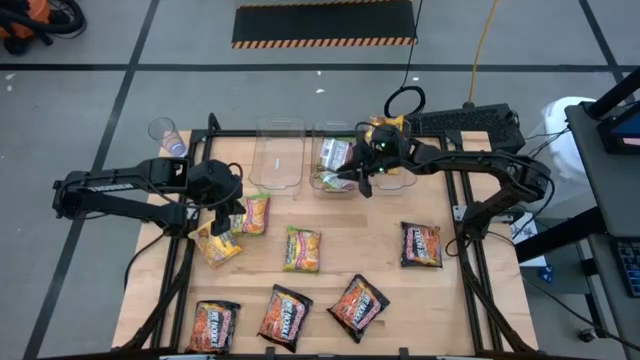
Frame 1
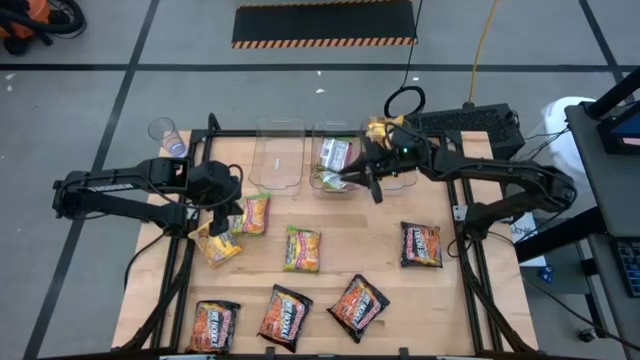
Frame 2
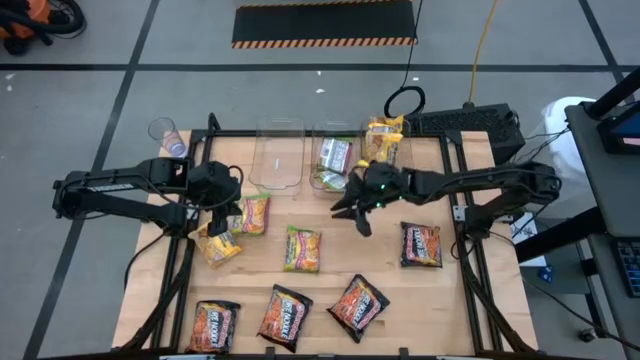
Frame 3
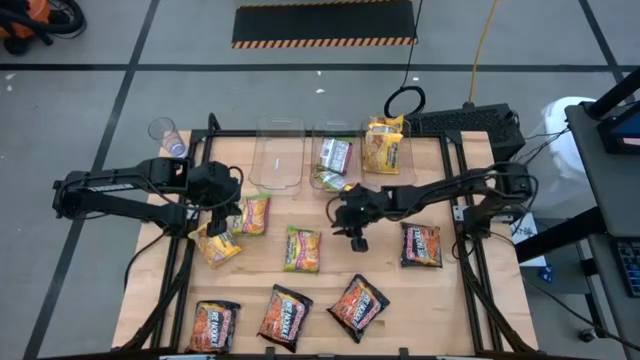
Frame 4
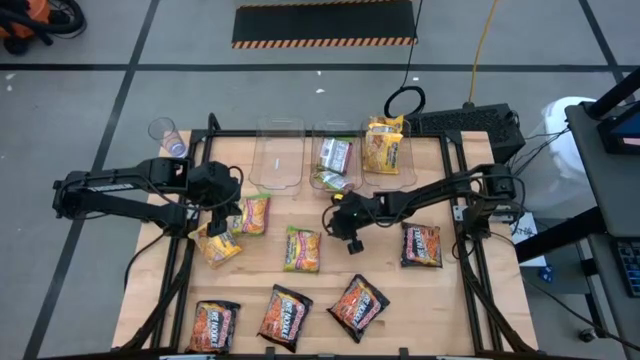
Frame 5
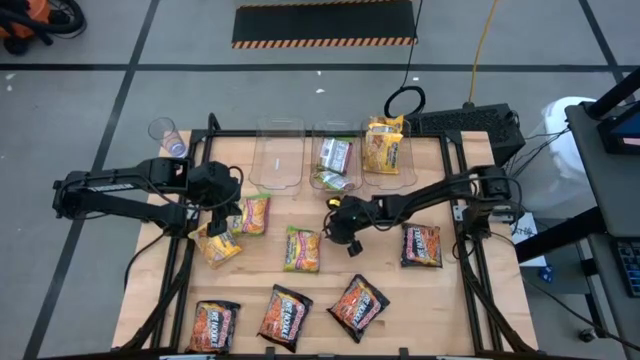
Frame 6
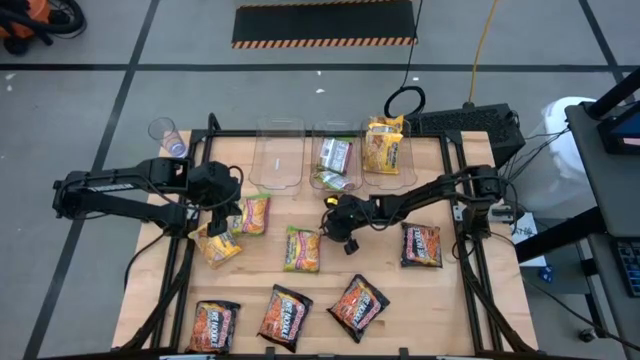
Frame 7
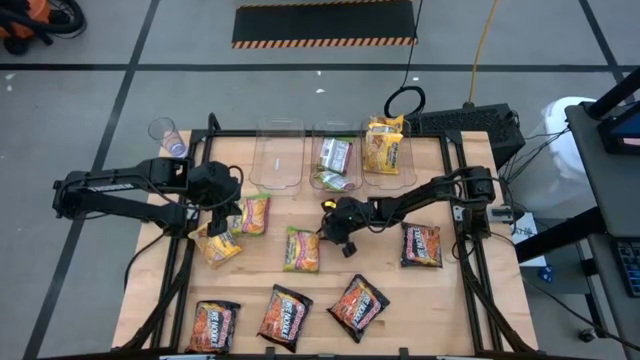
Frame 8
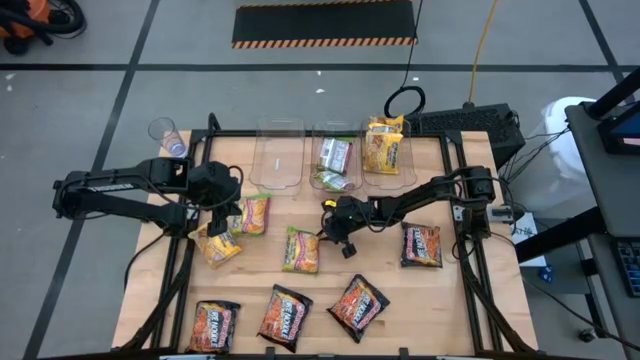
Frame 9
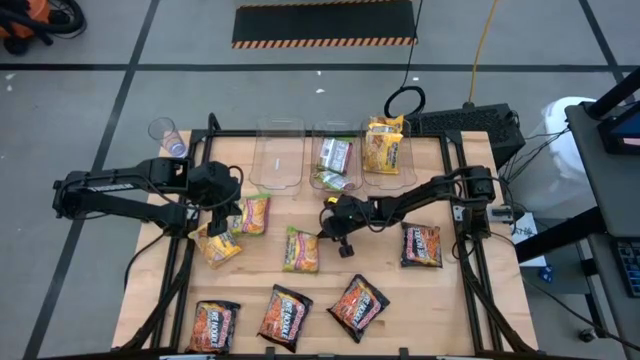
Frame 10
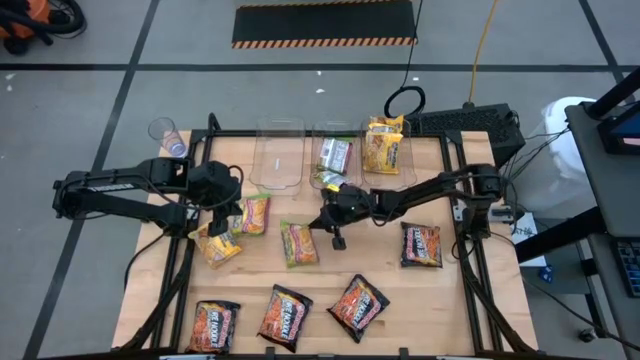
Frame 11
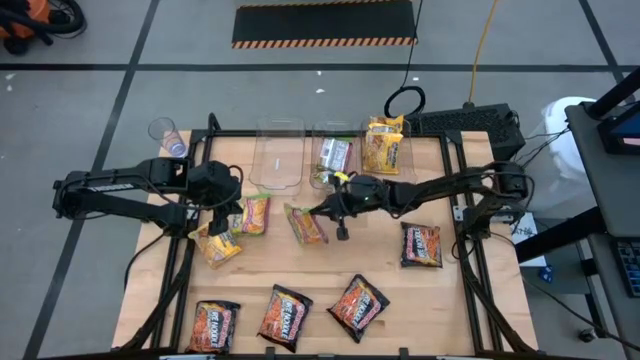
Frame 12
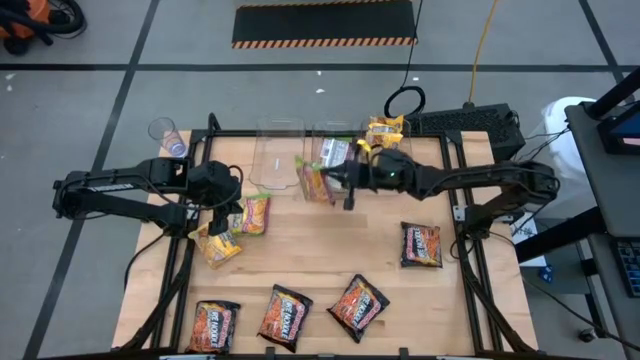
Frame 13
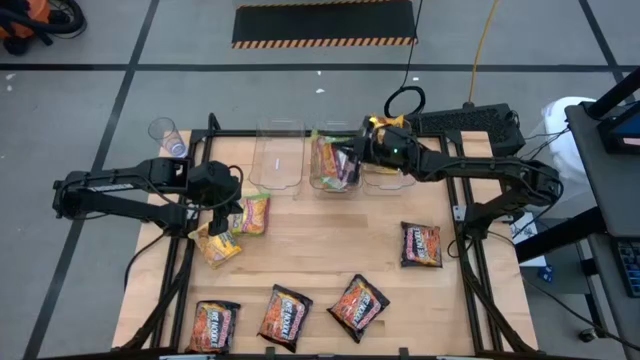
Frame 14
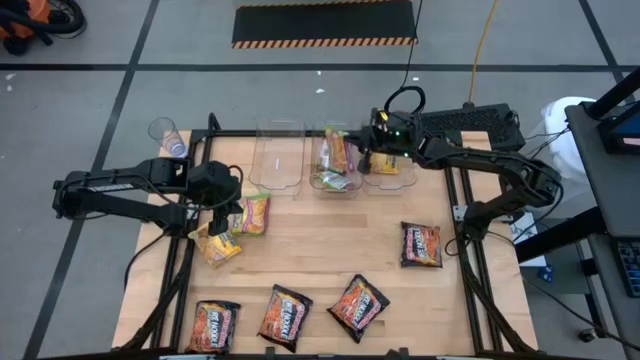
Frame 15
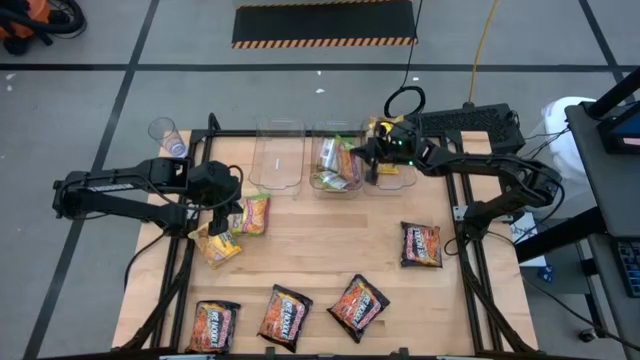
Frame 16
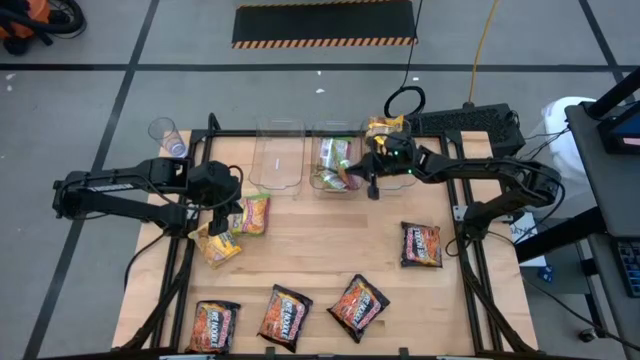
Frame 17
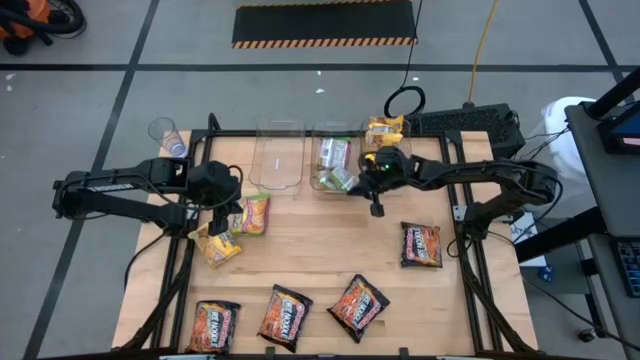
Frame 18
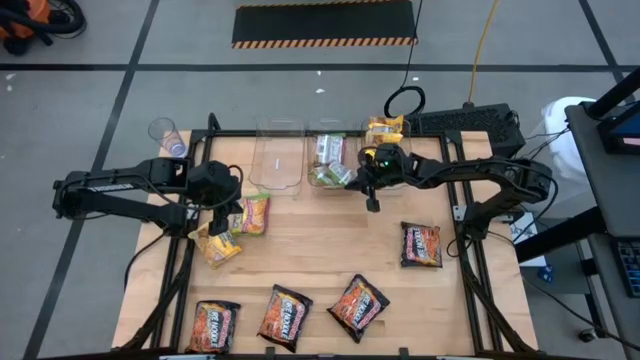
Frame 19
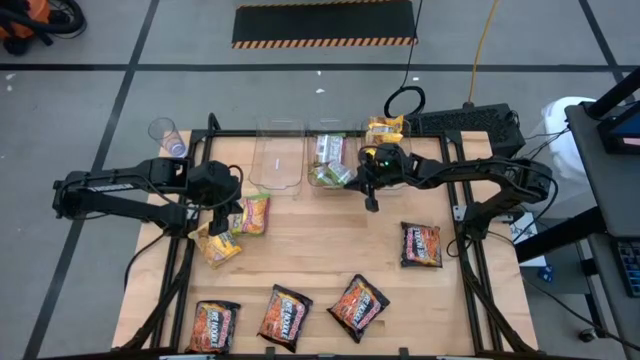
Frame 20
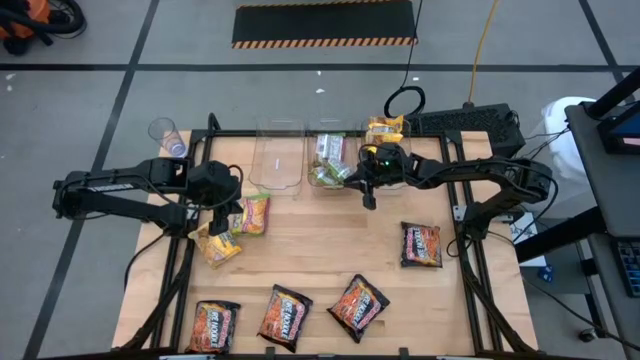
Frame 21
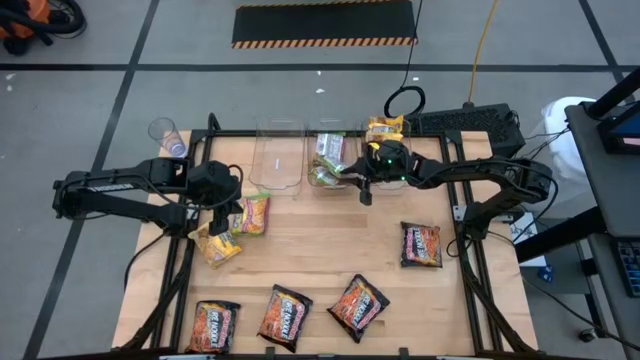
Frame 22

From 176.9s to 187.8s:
Task: Sort Maruchan noodles
Put the green noodle pack into the center transparent bin

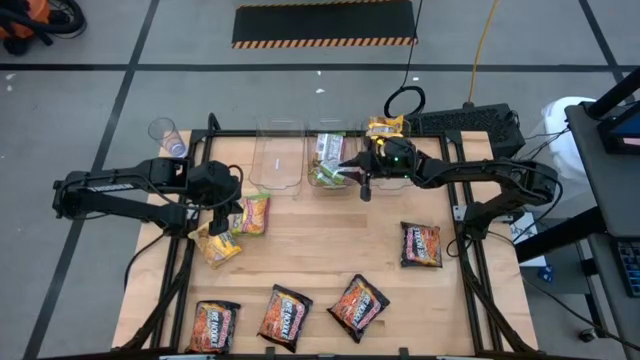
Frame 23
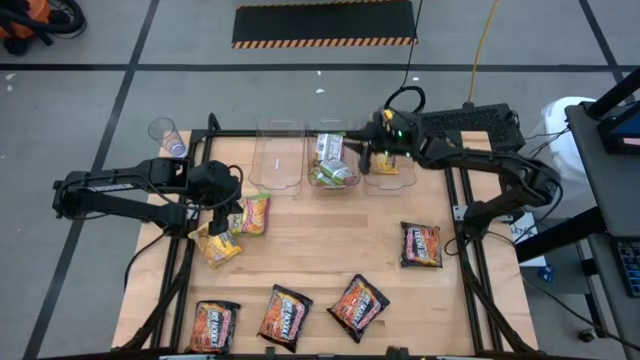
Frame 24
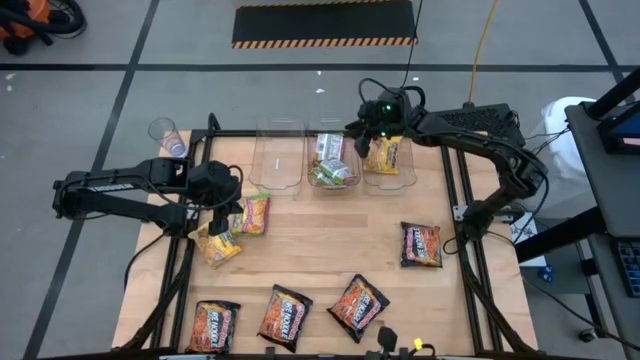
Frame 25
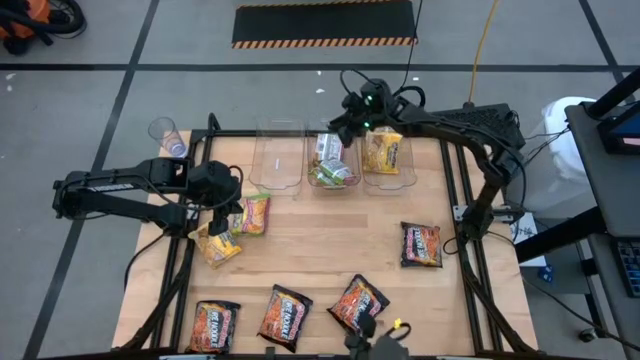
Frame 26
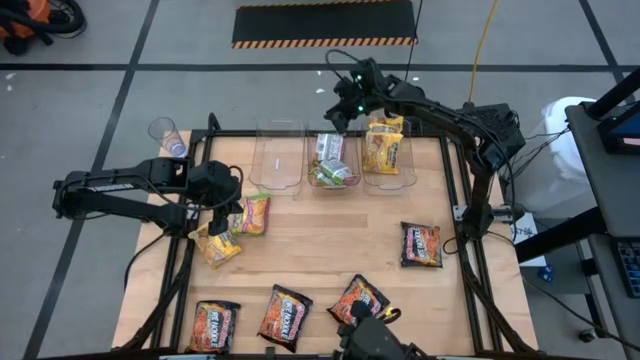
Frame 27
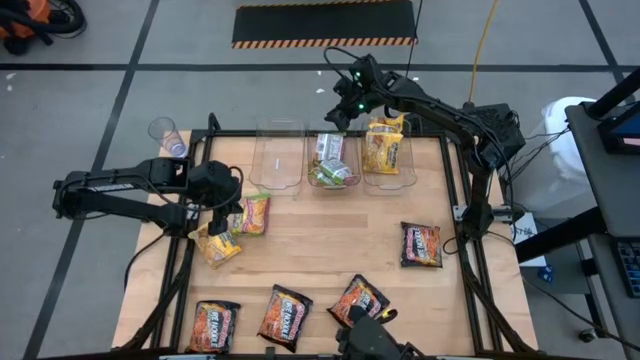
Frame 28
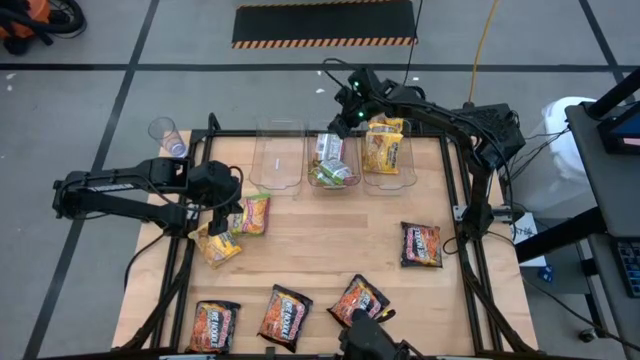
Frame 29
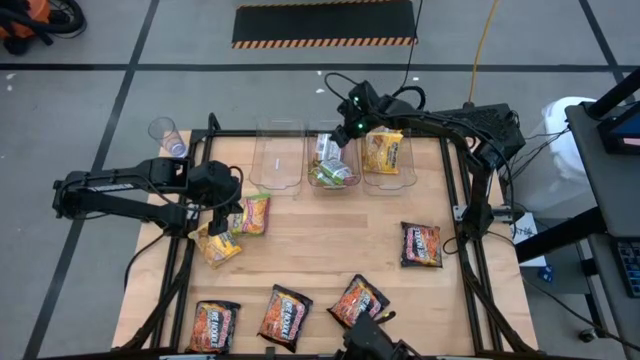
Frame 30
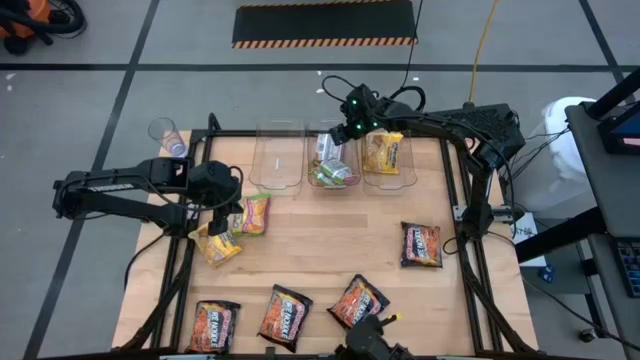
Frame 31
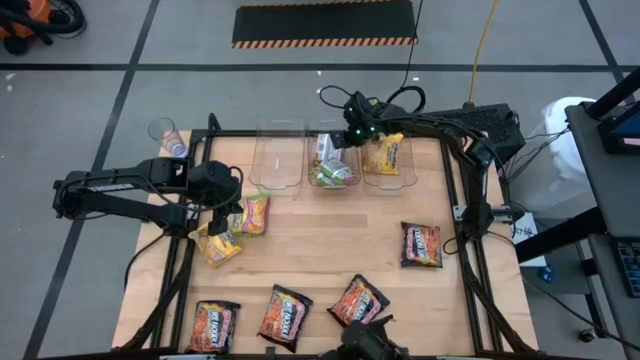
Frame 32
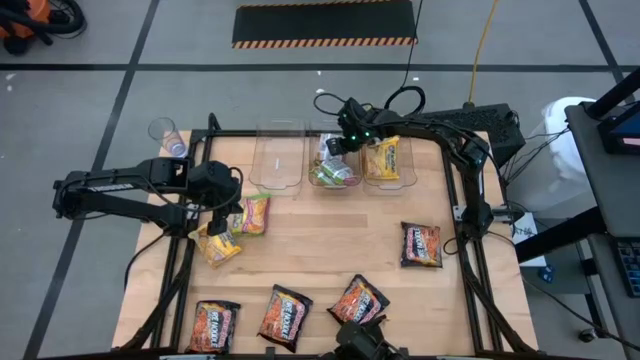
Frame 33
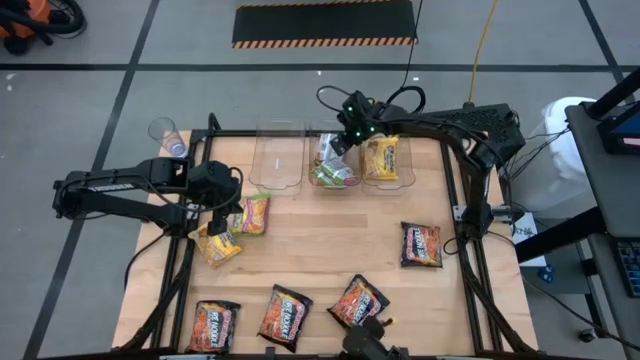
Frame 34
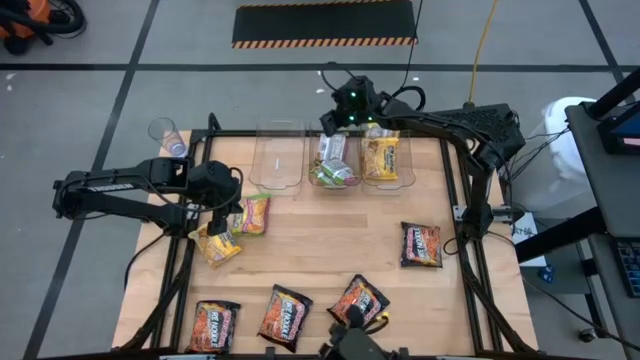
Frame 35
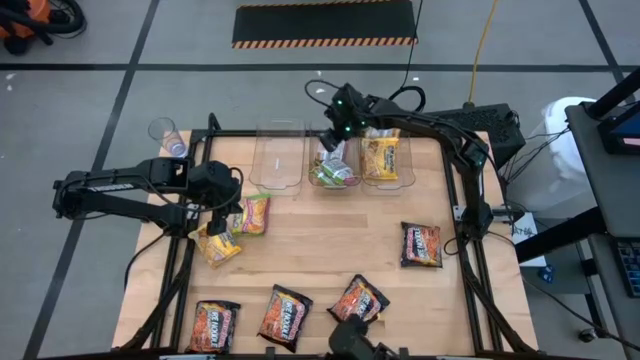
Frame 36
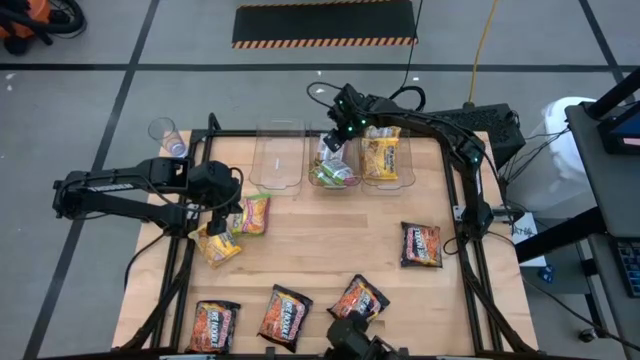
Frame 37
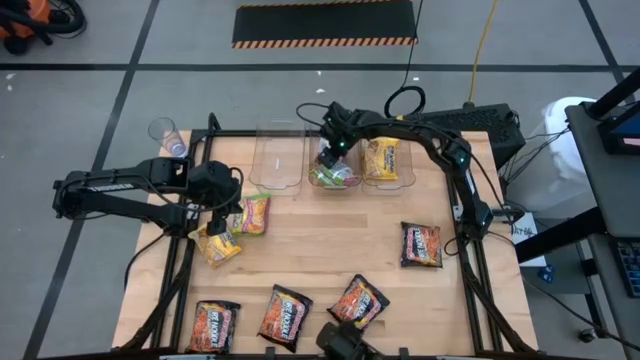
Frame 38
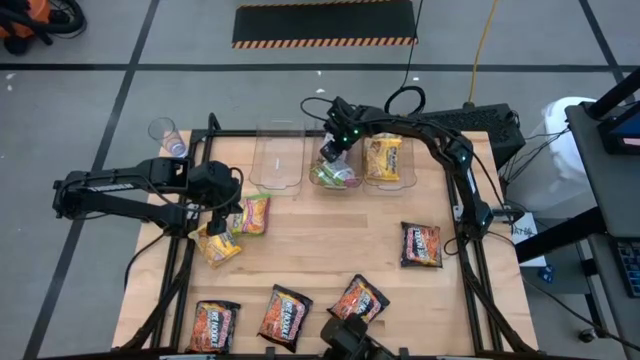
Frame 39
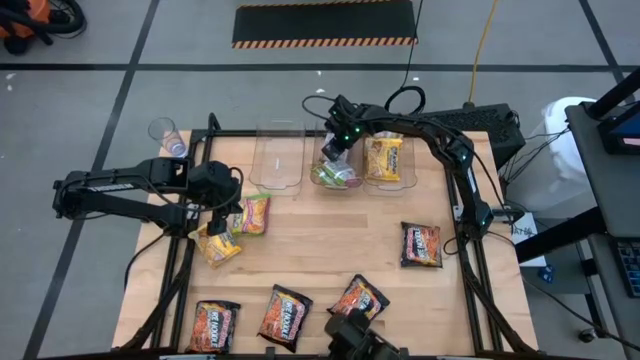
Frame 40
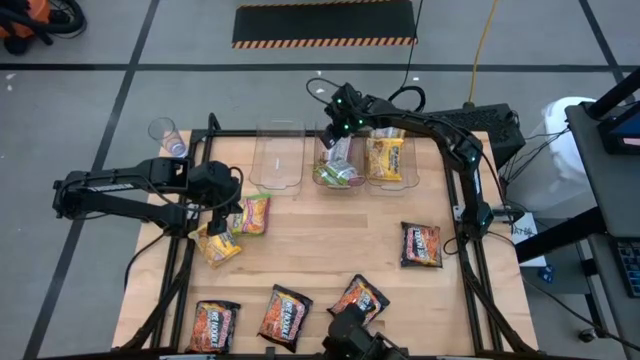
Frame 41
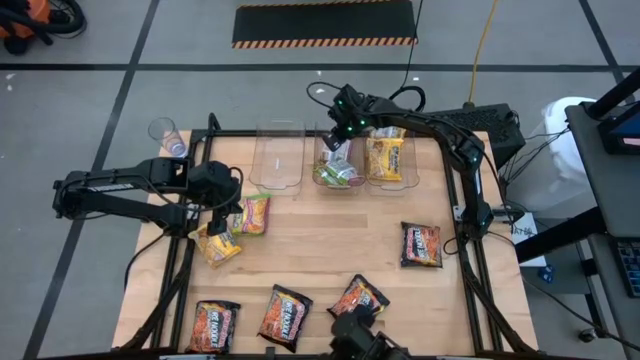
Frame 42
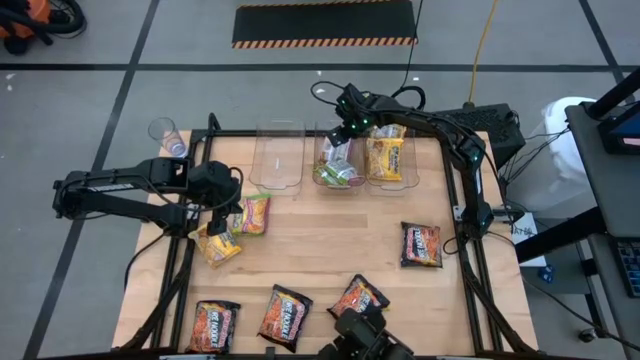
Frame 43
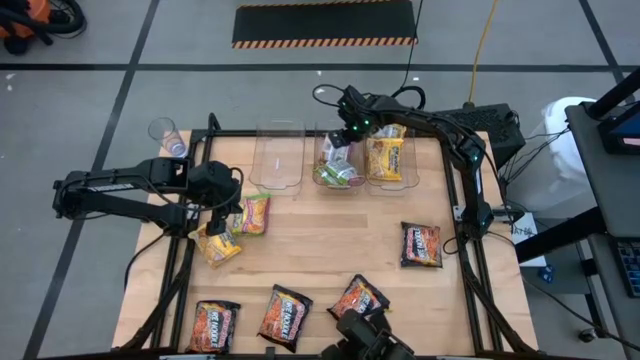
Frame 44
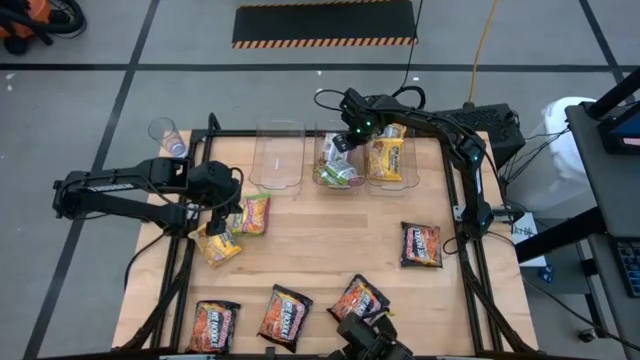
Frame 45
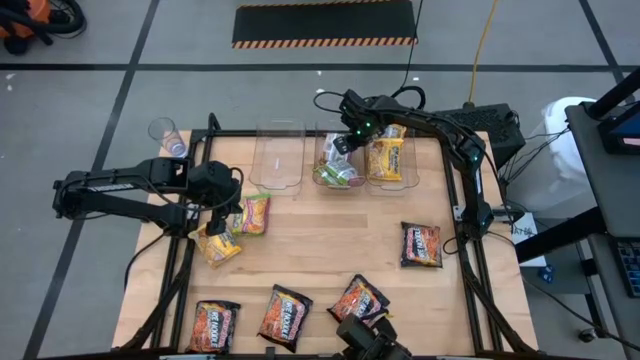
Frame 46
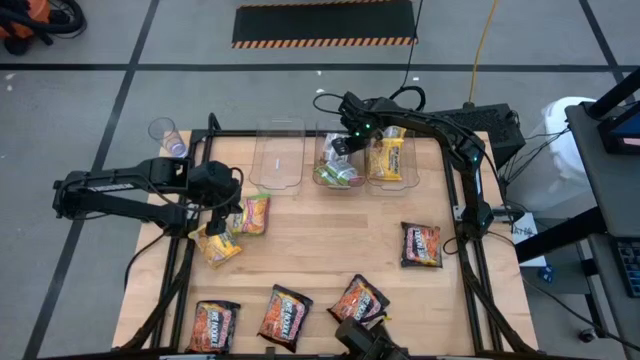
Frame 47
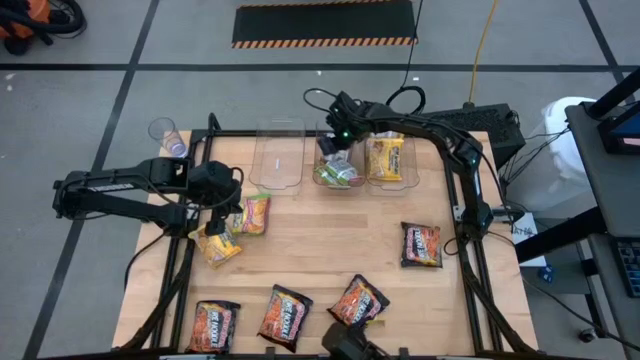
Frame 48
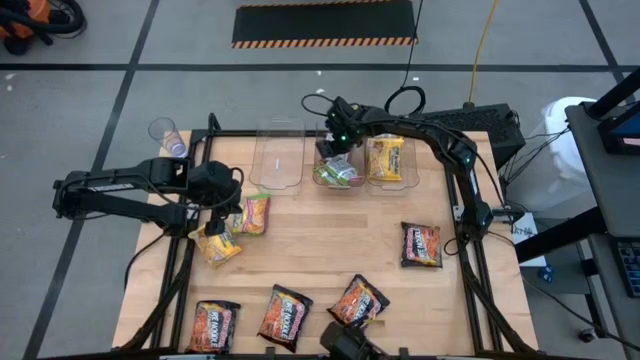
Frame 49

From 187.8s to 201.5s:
Adjust the green noodle pack in the center transparent bin
